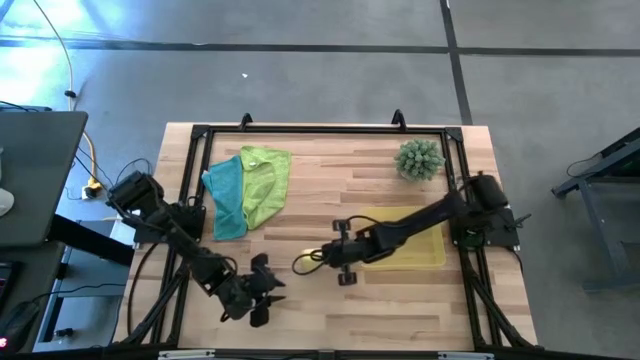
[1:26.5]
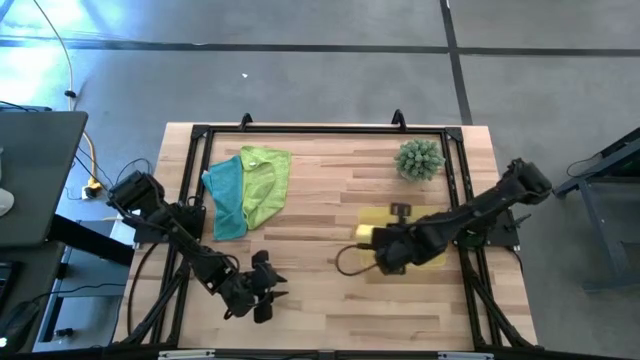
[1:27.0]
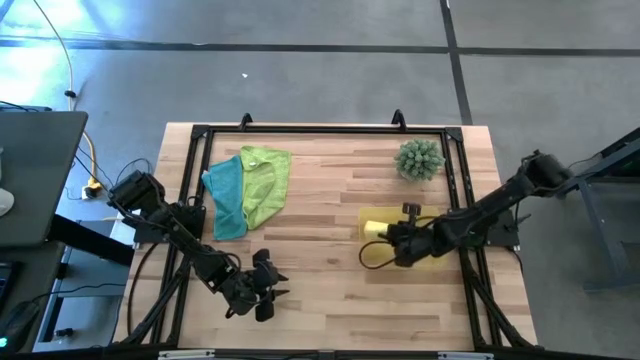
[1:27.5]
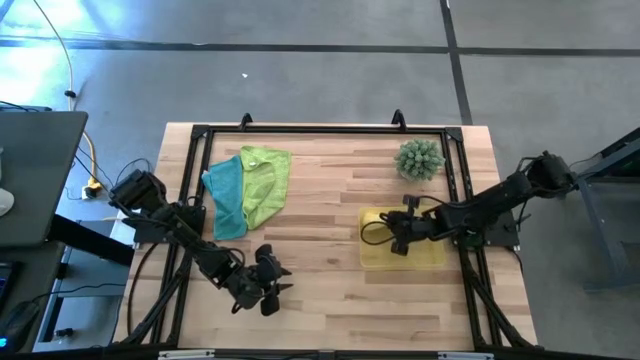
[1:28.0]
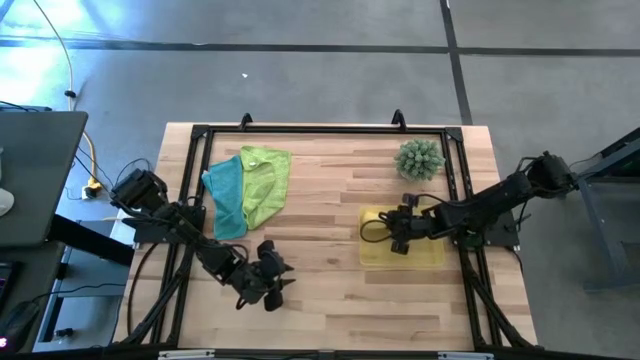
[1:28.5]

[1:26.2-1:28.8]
Task: Roll microfiber towels into tight, uniform cylinder then place into a basket
Put the yellow microfiber towel into the yellow bin

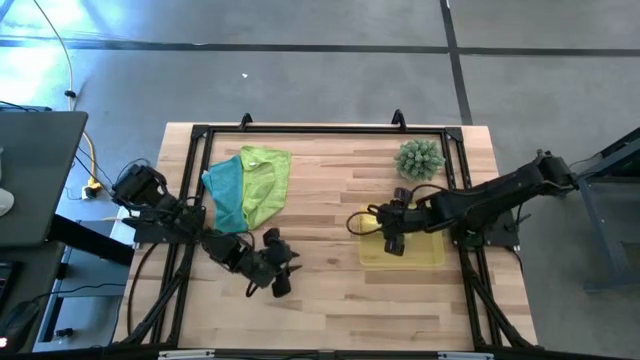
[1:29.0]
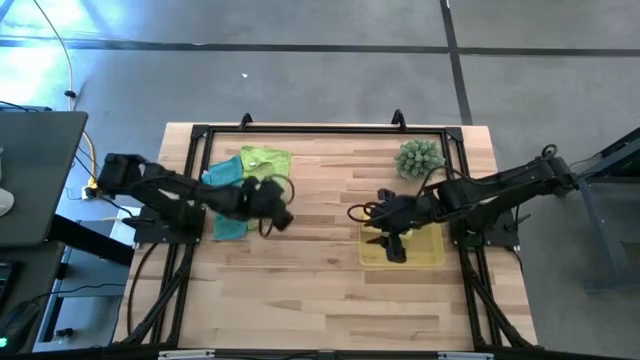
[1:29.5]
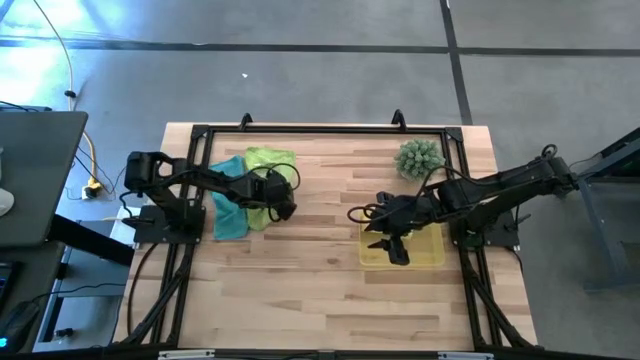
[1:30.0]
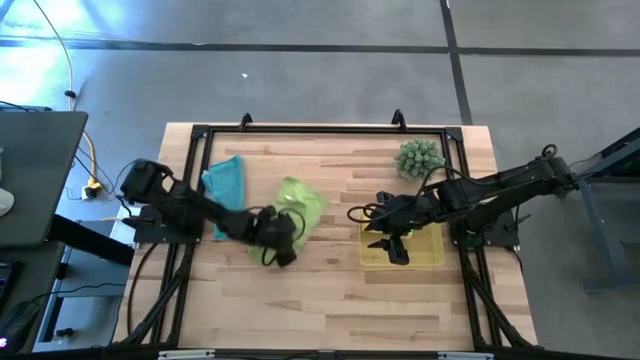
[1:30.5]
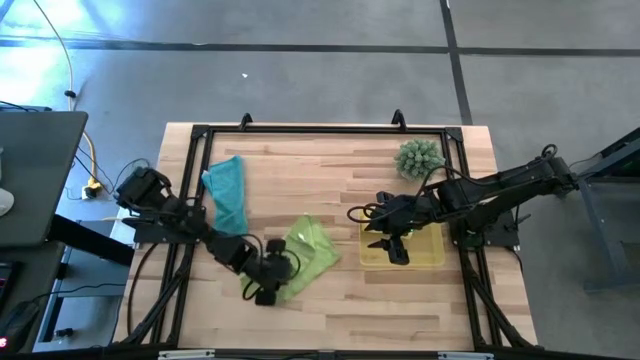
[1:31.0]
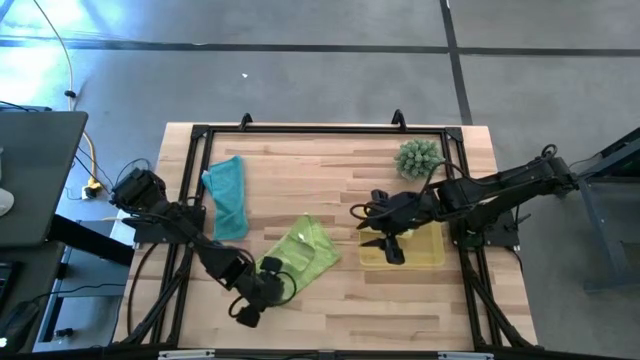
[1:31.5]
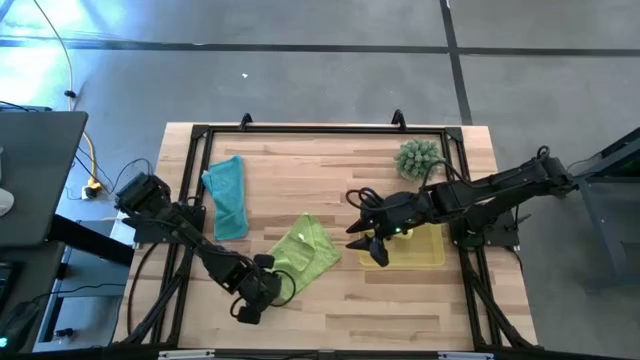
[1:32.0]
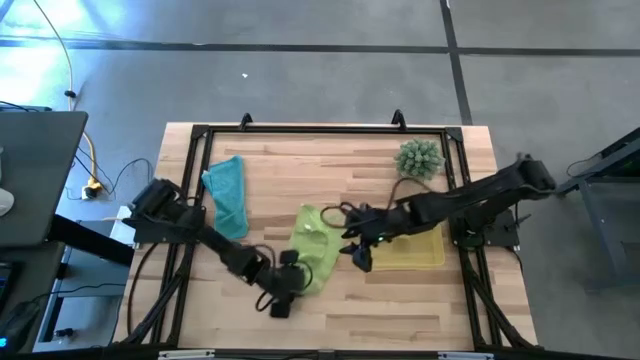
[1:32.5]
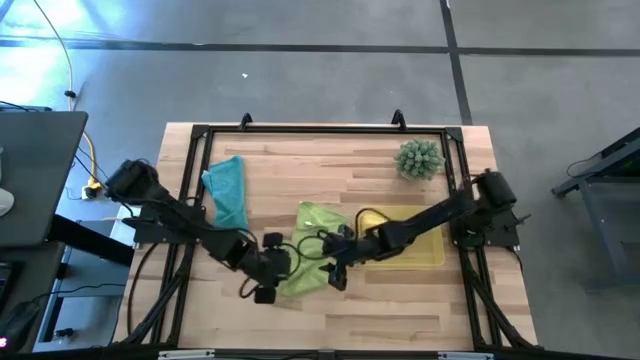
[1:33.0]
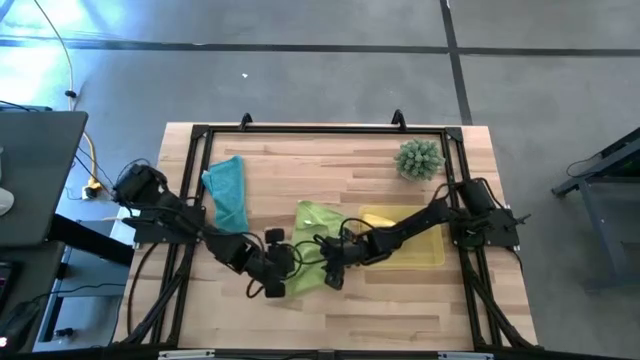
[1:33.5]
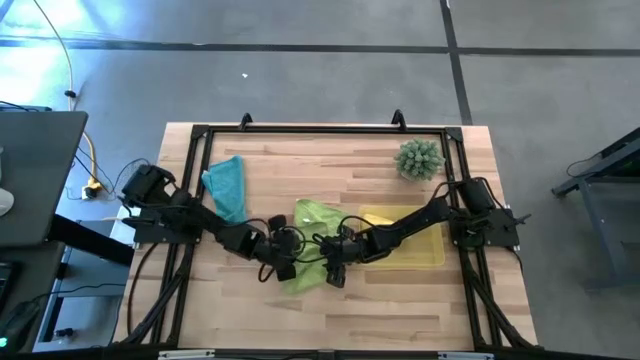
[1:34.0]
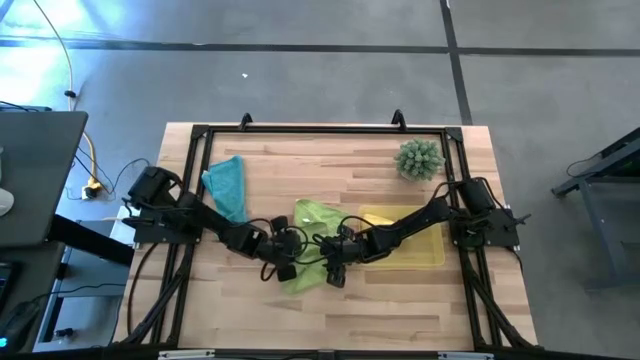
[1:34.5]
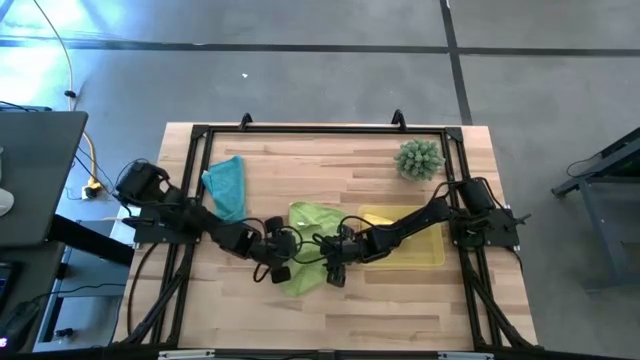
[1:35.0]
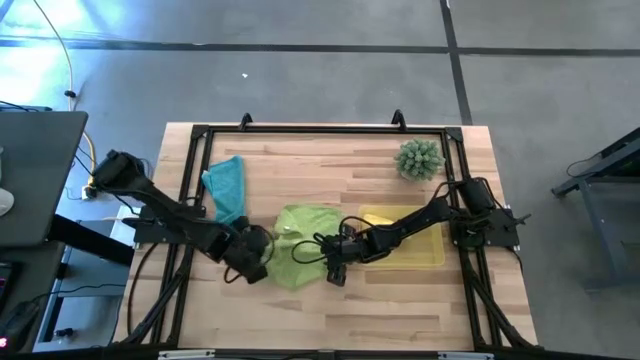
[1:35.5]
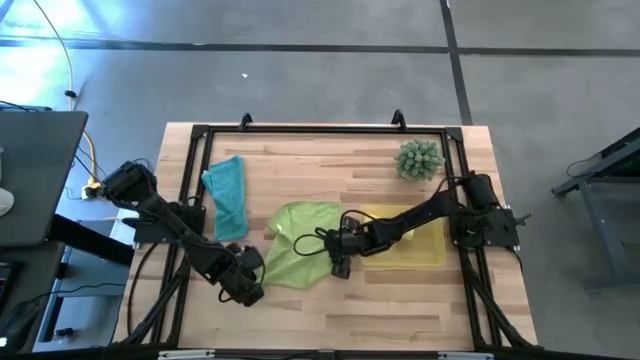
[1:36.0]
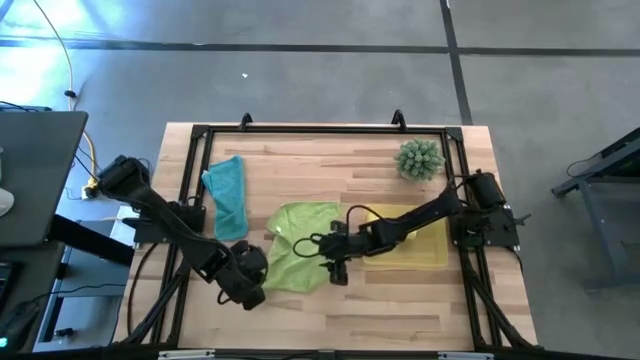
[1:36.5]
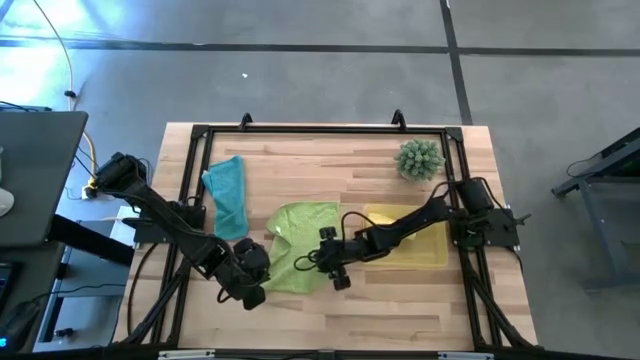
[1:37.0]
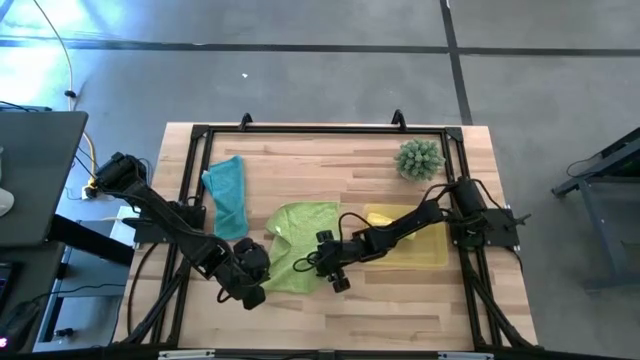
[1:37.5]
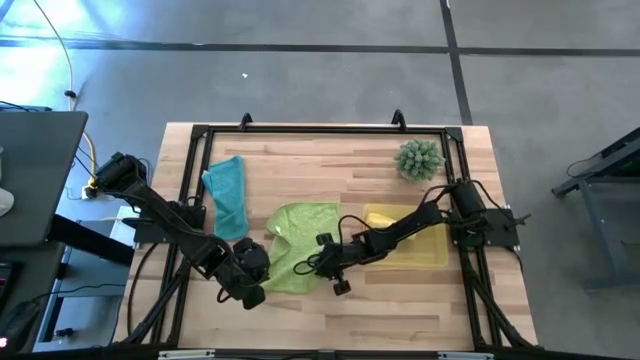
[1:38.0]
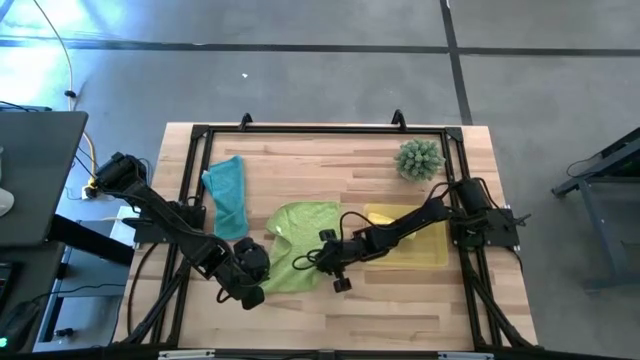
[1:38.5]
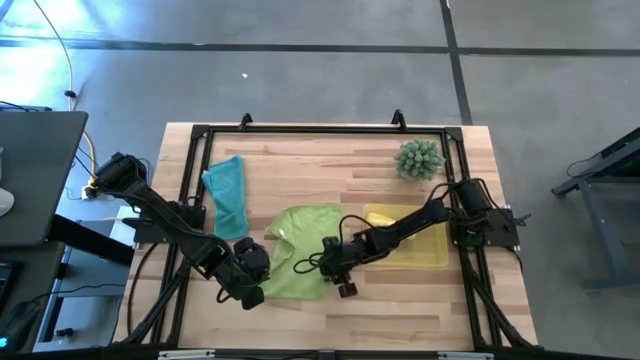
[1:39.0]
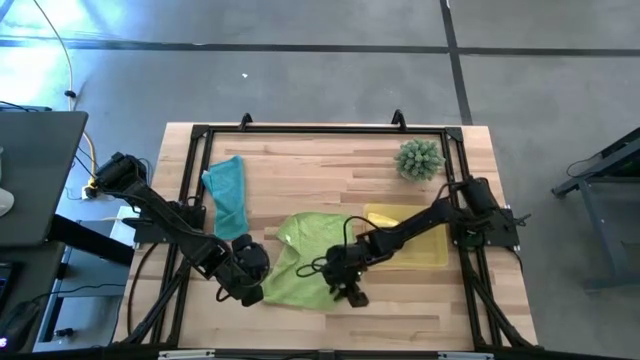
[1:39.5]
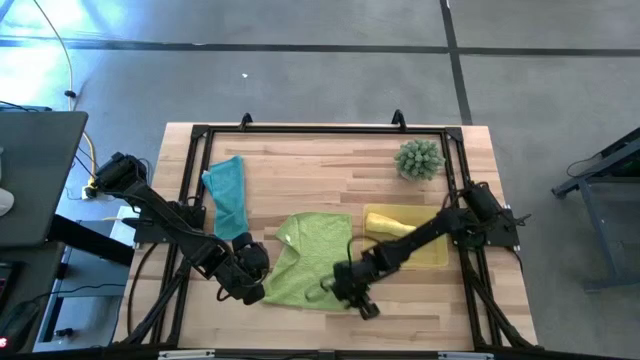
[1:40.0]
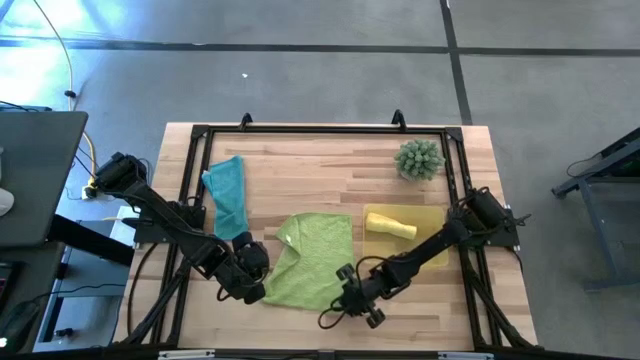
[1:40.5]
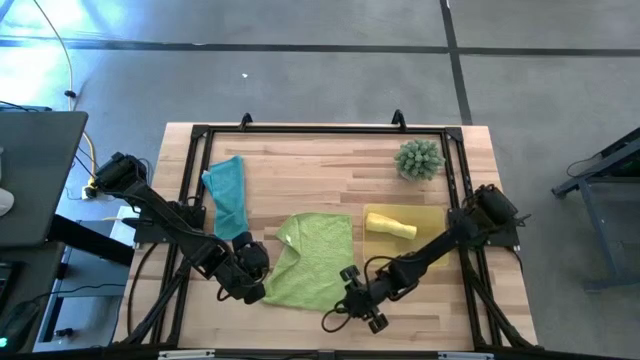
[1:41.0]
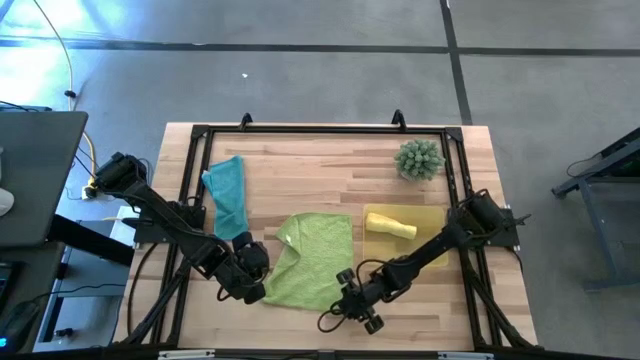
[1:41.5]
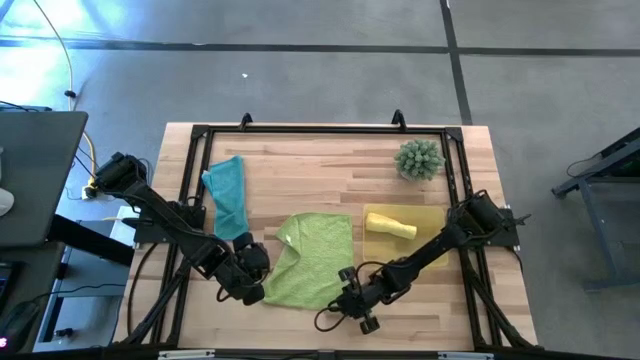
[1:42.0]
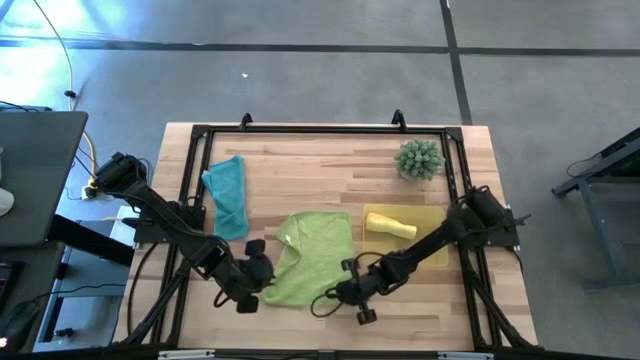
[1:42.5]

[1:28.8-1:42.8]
Fold the green microfiber towel

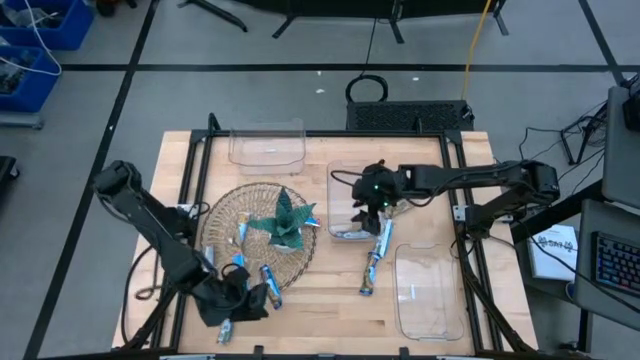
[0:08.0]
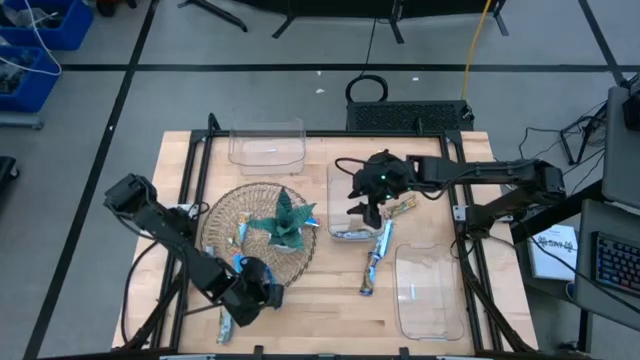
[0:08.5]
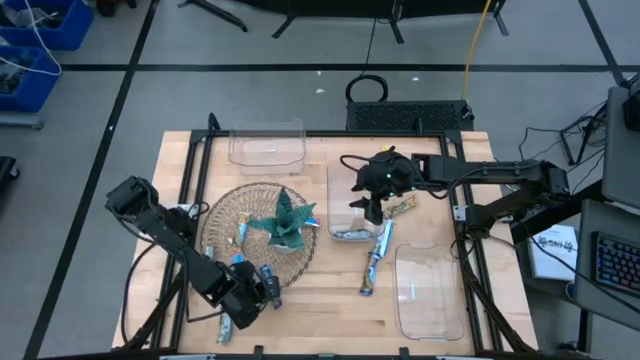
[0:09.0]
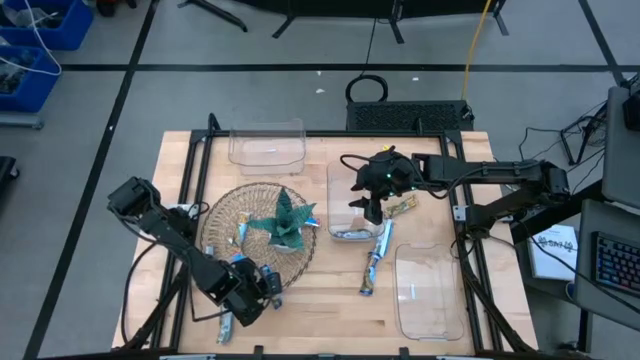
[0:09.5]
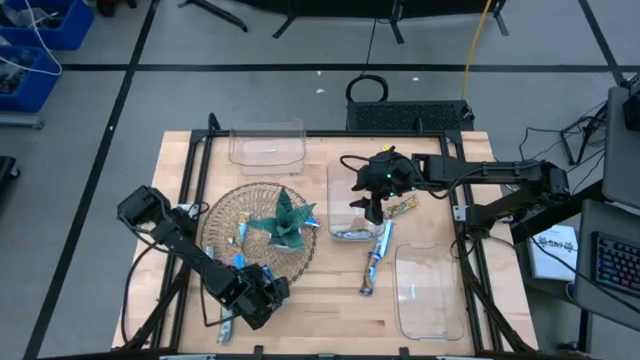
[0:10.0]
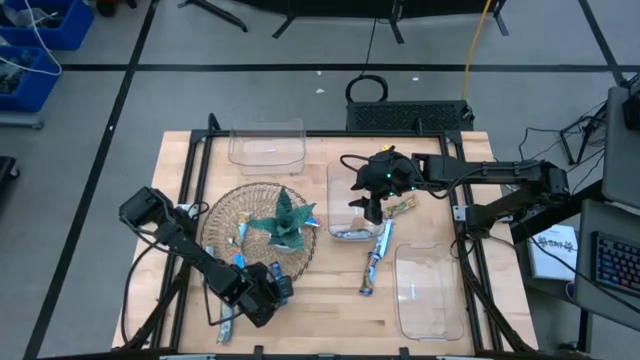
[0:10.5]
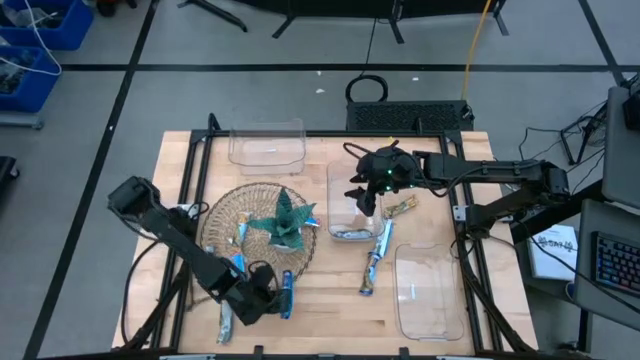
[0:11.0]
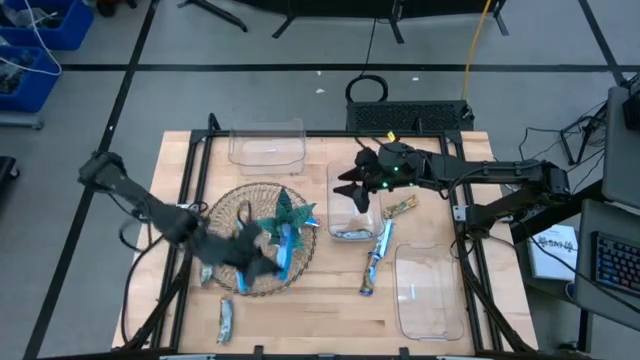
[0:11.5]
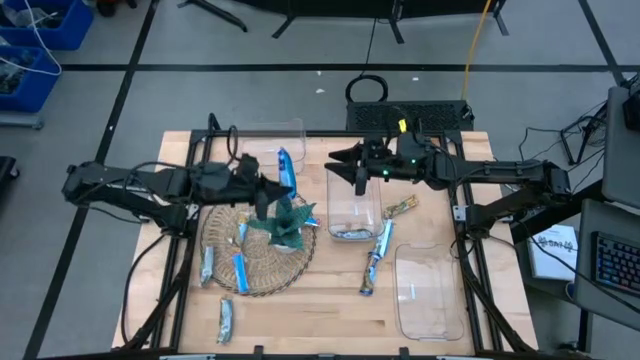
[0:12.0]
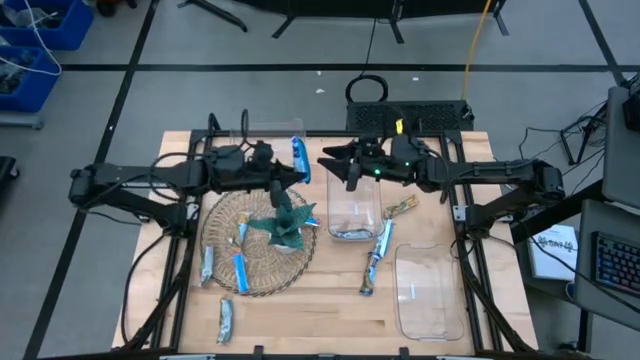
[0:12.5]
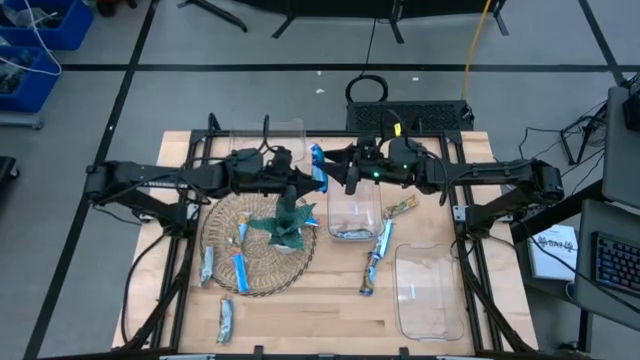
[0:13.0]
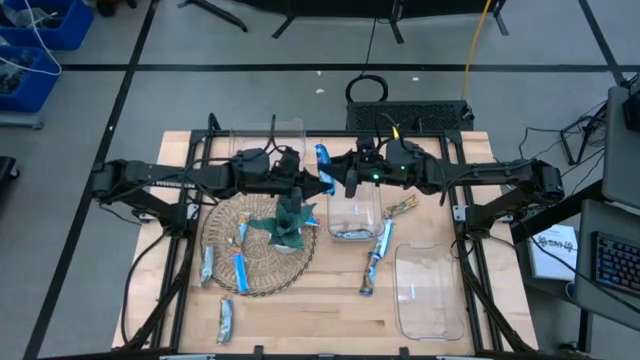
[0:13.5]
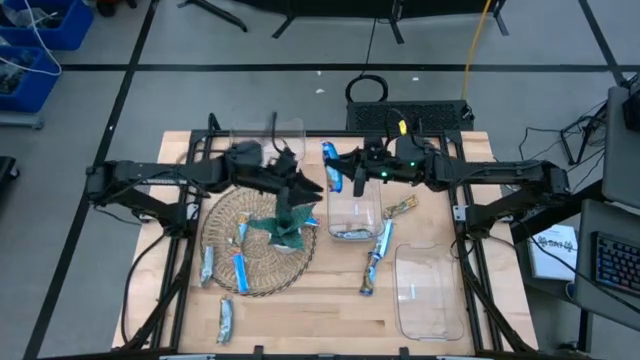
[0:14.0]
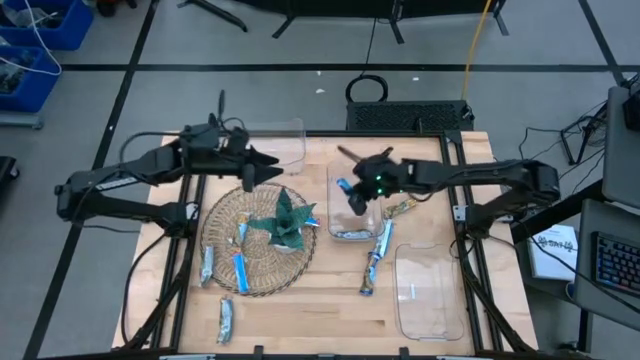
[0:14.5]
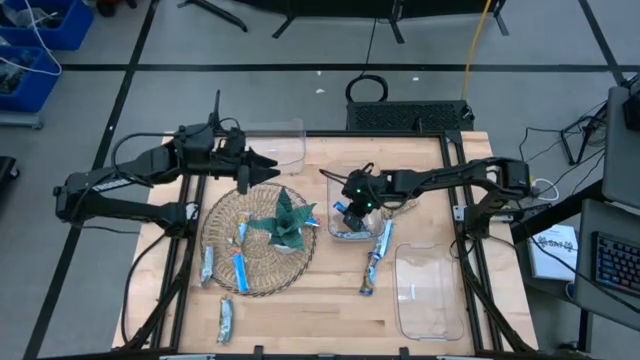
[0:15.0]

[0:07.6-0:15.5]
Task: Pick and place Granola Bars by type
Put the blue granola bar into the middle transparent bin
